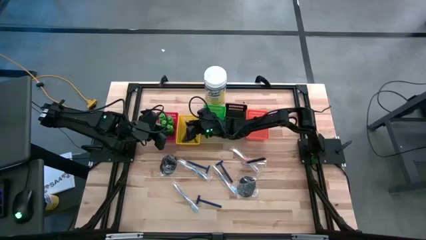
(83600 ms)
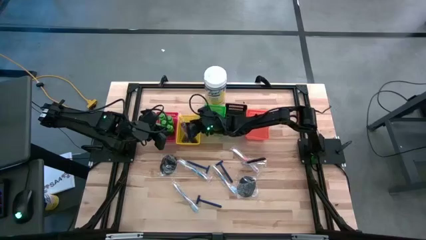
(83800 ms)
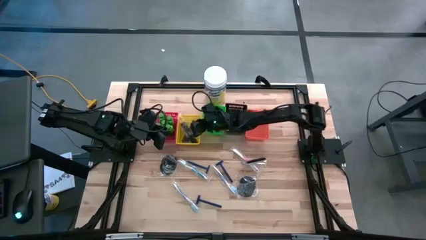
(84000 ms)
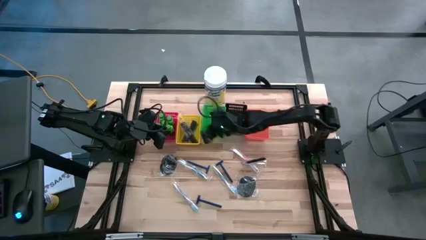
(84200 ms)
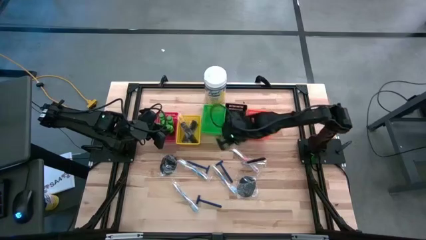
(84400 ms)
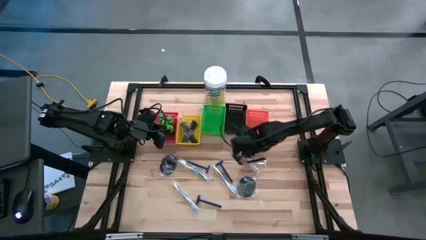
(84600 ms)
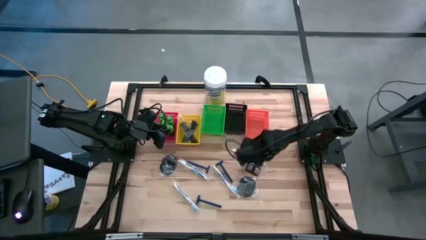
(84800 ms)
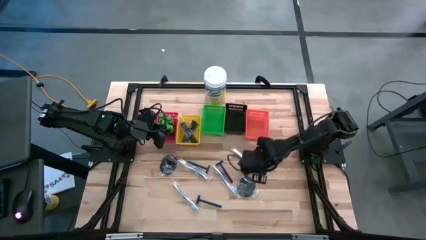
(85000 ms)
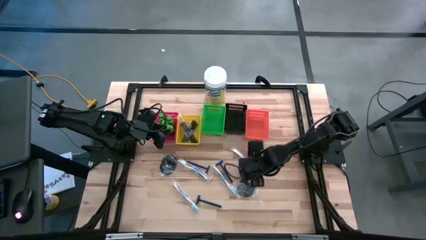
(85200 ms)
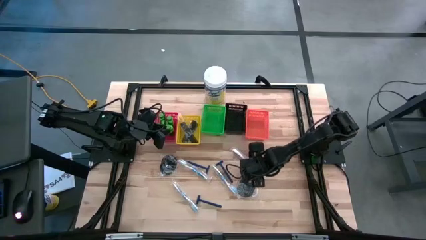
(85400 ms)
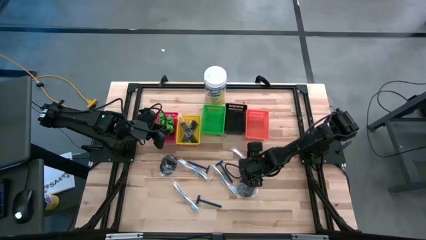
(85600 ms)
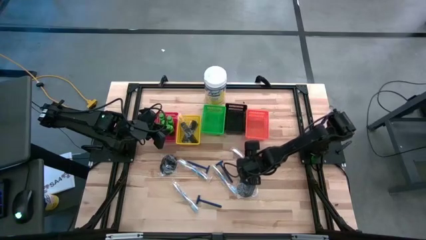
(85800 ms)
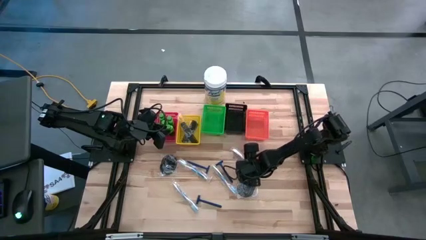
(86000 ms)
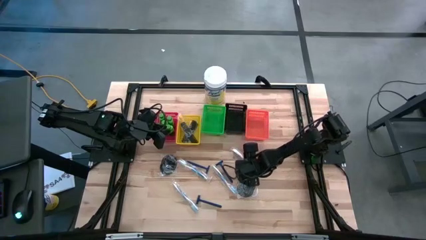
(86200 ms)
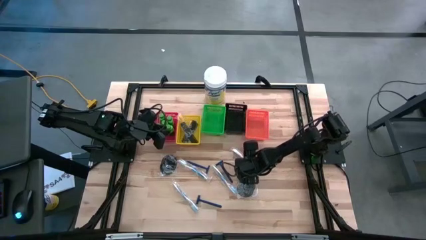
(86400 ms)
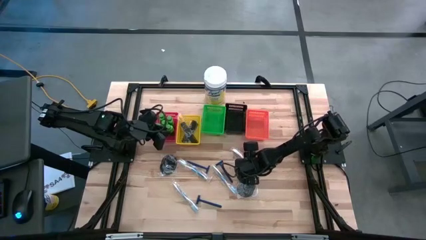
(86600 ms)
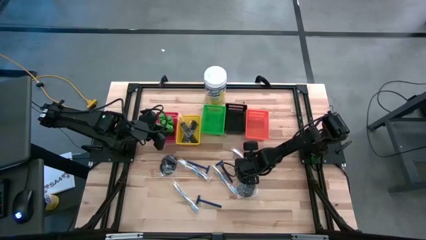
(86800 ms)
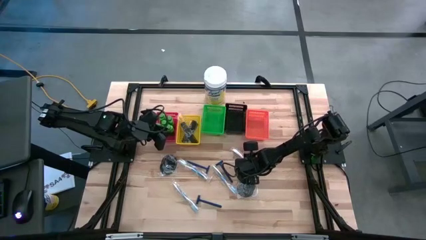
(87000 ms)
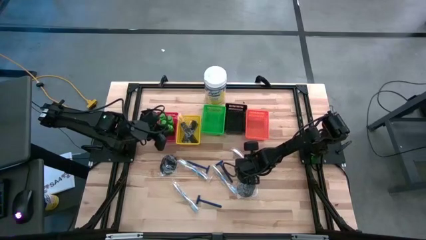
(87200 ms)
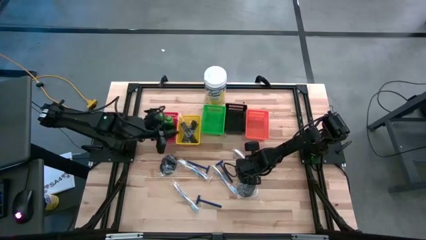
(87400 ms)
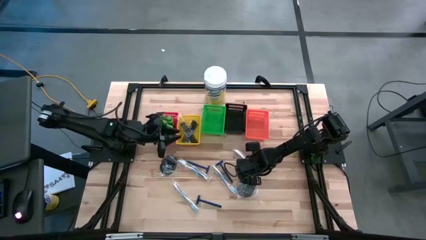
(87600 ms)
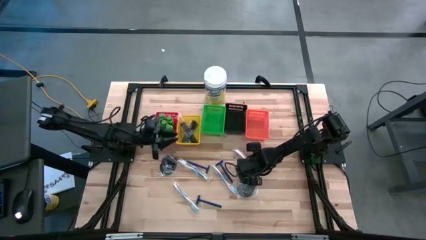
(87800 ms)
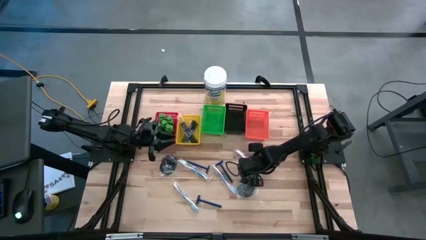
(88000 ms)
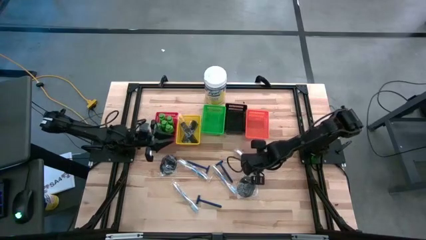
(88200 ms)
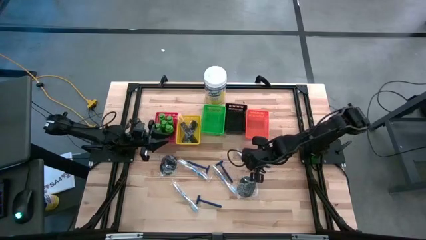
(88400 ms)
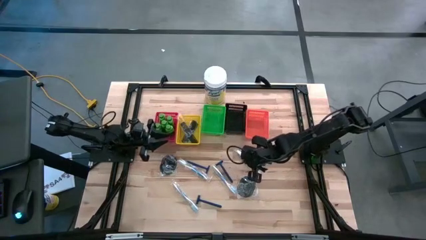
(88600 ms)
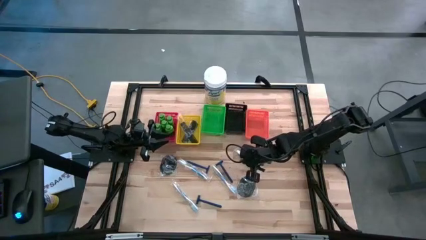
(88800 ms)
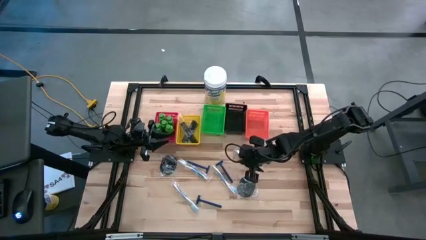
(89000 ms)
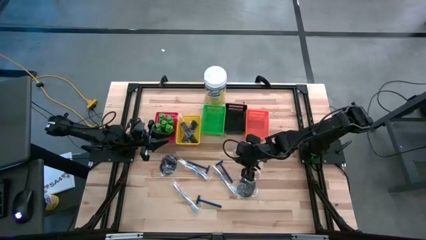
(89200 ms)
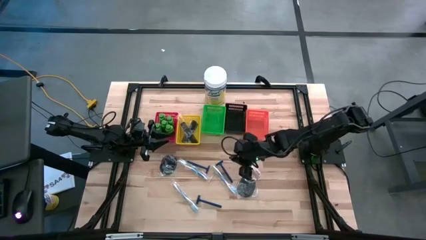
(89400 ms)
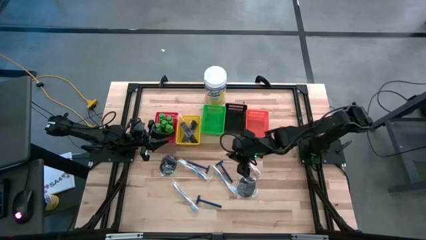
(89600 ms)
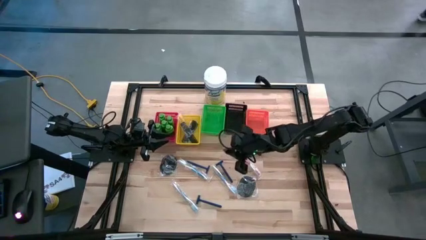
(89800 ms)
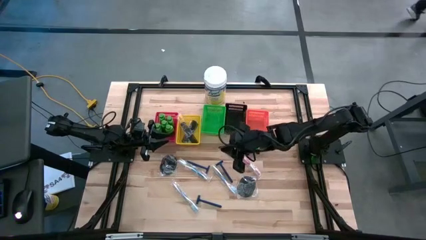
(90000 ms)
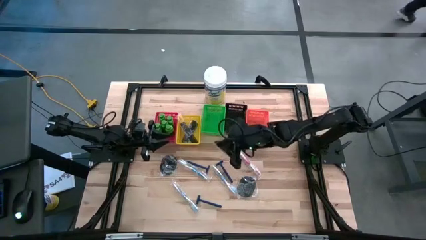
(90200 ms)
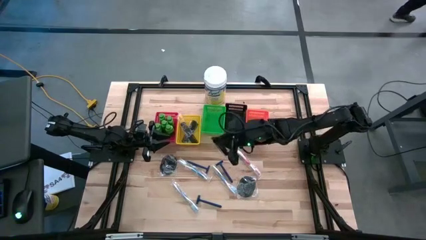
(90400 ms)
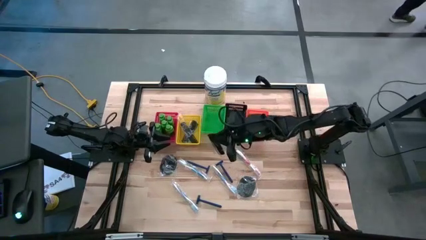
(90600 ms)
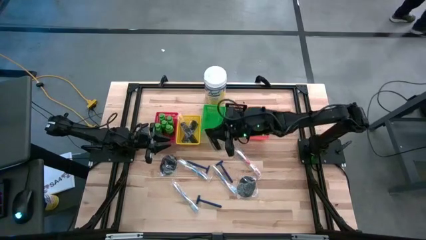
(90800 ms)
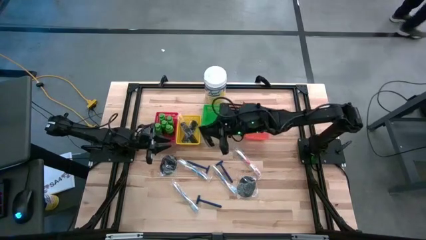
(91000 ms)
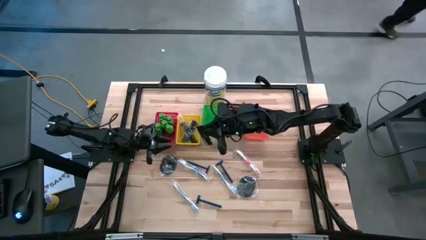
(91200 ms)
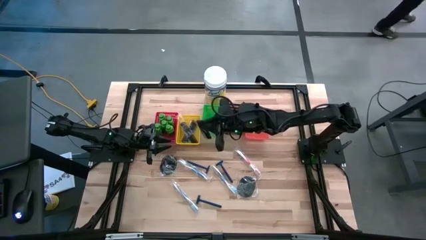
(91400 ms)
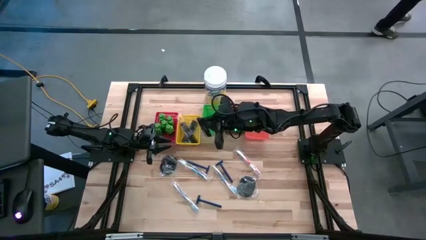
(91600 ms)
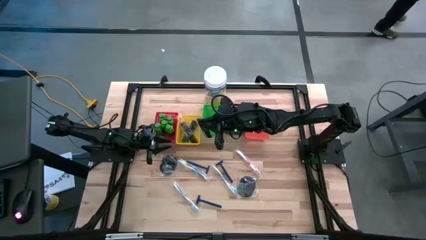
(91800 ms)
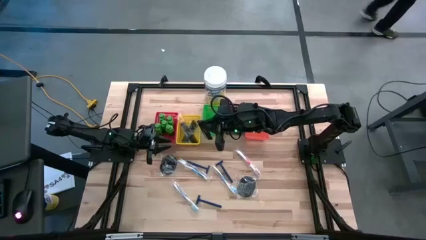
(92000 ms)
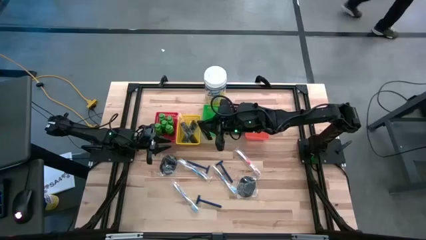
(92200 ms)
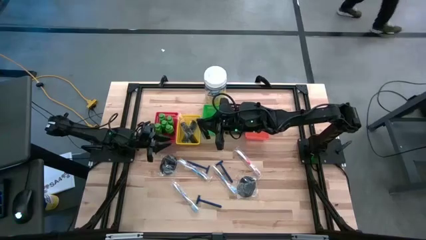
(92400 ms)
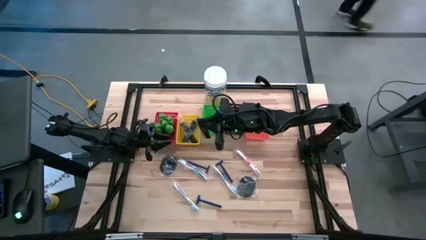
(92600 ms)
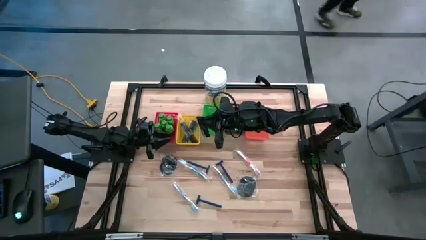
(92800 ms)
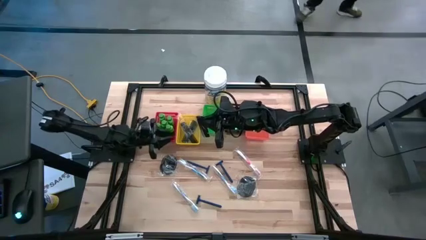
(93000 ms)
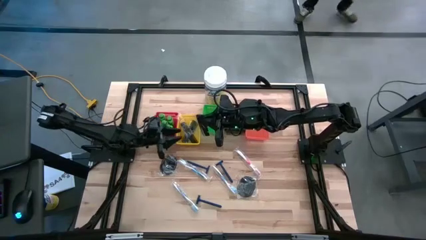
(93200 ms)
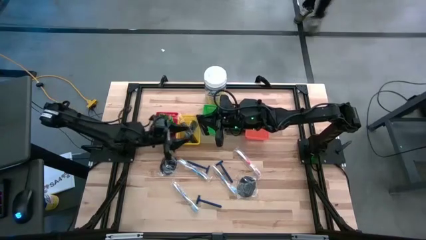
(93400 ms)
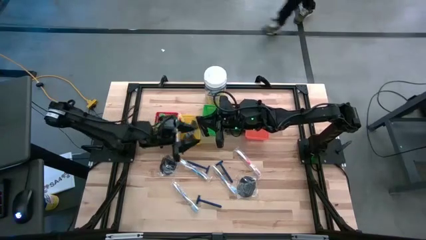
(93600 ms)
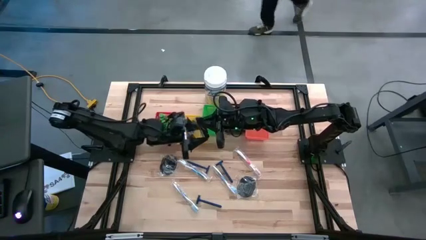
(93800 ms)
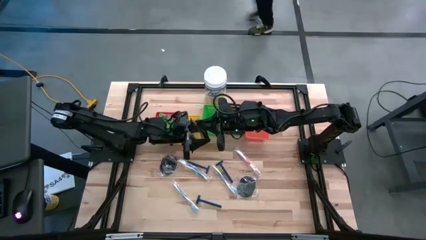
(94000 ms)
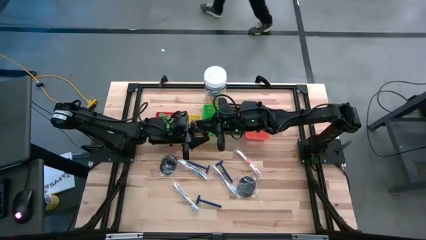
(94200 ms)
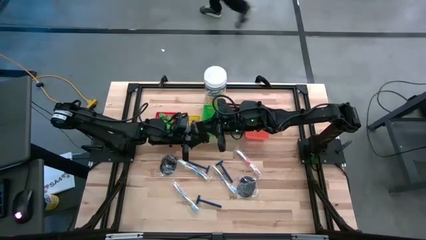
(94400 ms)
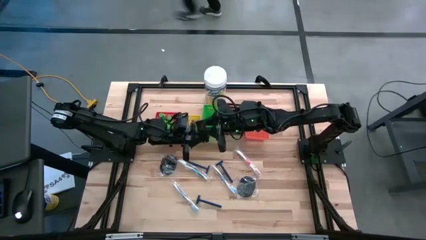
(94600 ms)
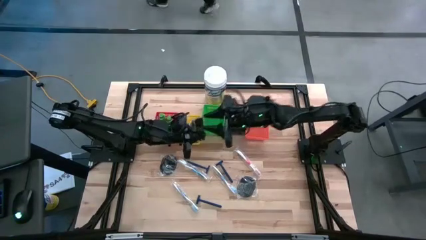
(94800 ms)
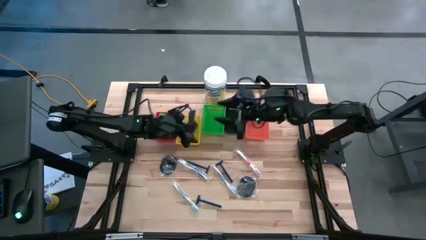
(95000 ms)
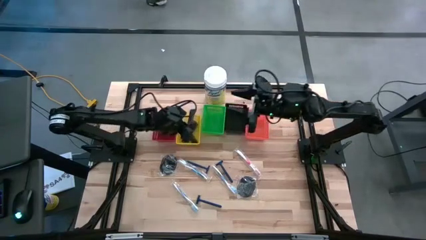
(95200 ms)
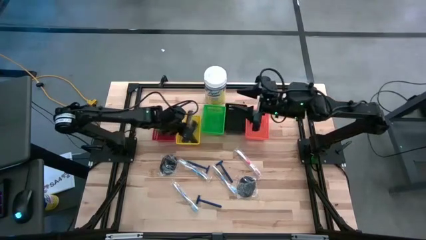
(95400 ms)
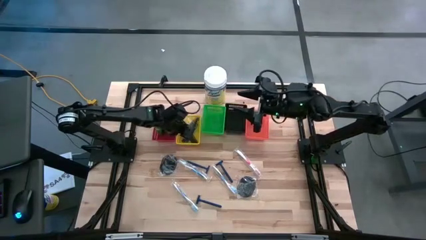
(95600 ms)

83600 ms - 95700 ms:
Task: Pick & Place Travel size toiletries
Put the black hair comb into the yellow bin

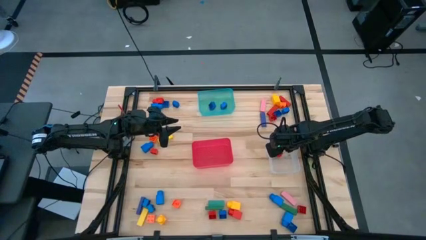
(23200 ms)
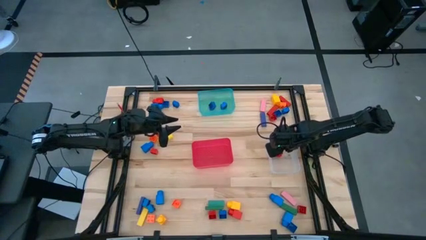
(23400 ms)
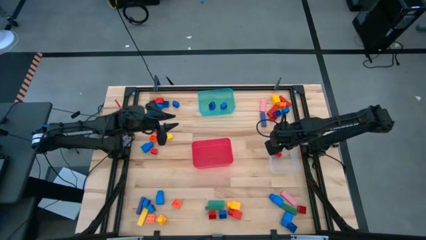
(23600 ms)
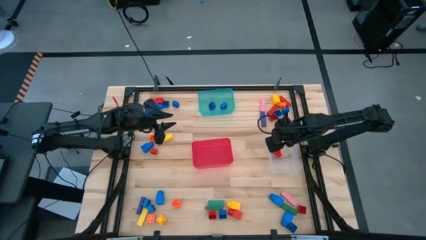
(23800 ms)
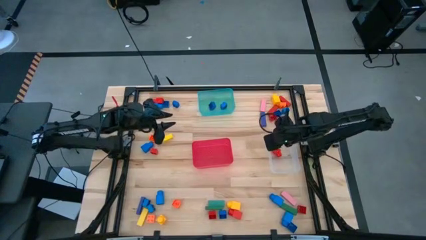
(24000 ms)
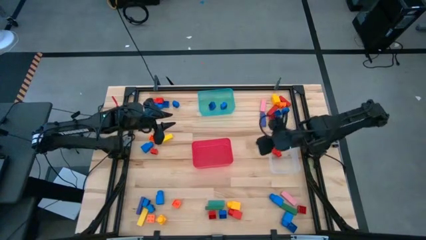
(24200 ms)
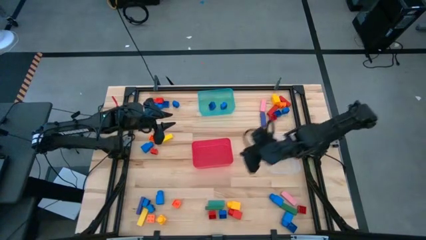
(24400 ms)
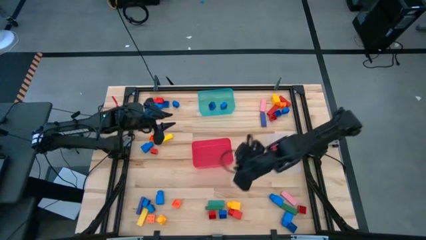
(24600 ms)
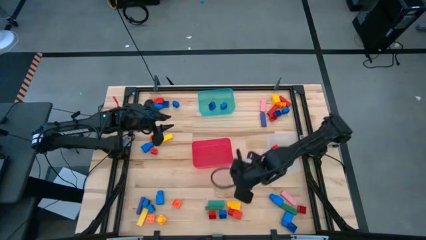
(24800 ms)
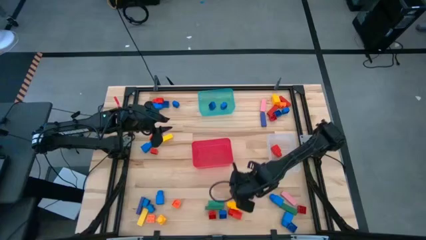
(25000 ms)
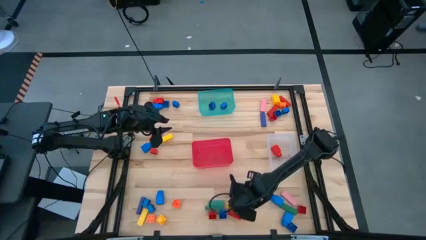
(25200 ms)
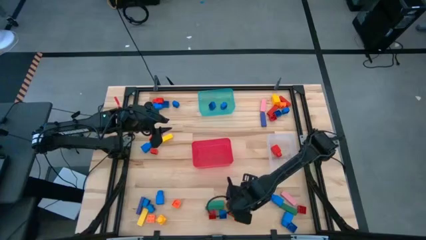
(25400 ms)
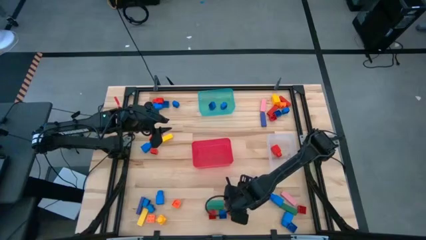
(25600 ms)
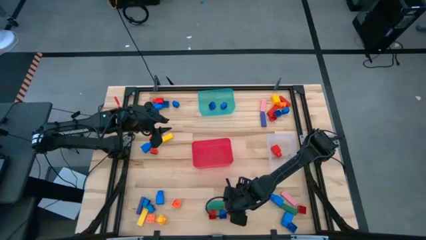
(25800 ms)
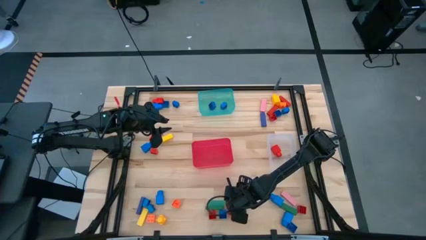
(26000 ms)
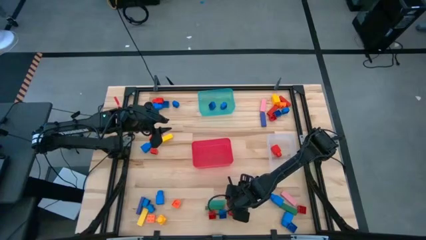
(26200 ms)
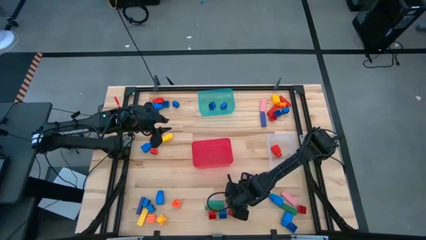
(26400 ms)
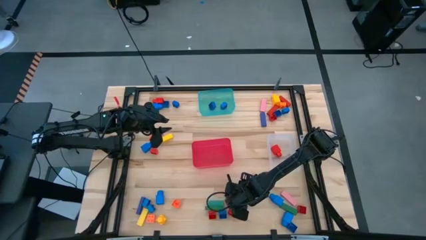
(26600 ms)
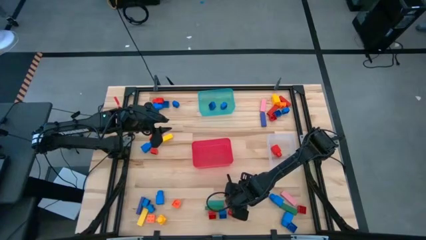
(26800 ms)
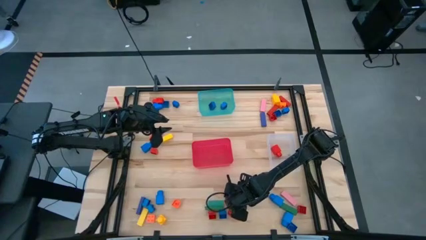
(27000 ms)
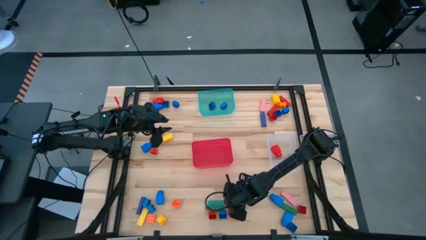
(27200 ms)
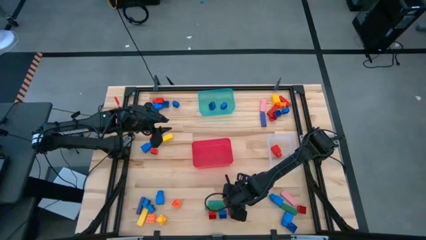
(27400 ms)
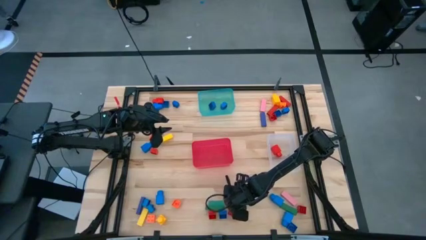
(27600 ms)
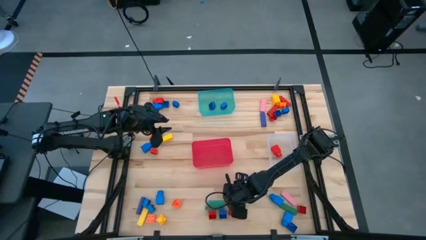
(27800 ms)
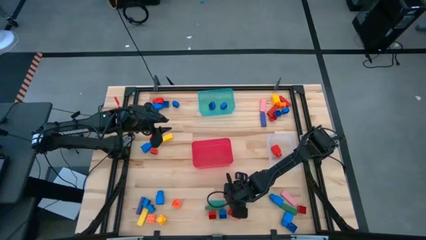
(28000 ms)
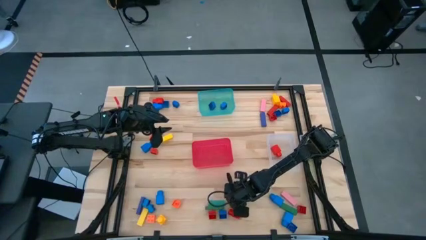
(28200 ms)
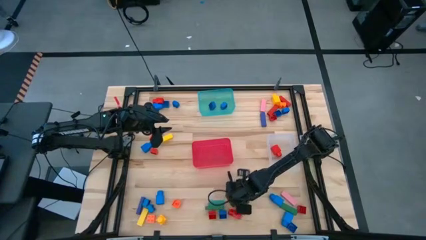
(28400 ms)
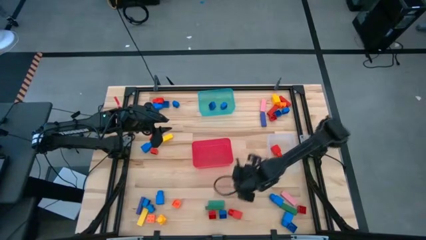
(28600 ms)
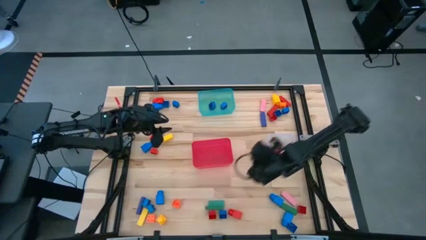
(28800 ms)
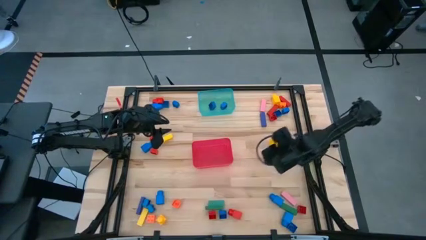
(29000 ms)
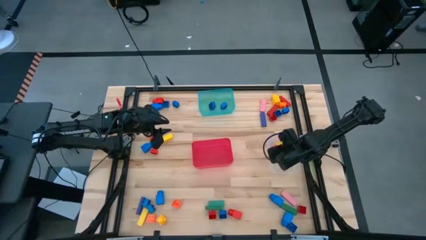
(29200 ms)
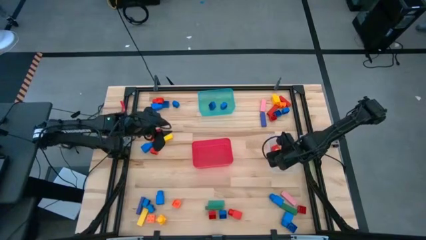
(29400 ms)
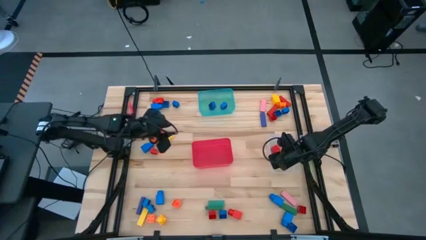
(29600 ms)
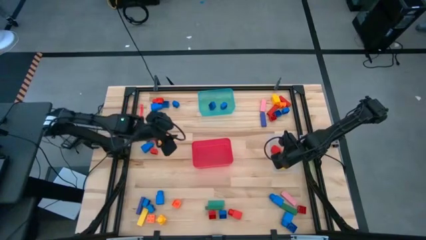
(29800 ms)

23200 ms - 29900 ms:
Task: Sort blocks by size
Put the yellow 1 stud game piece into the transparent bin
